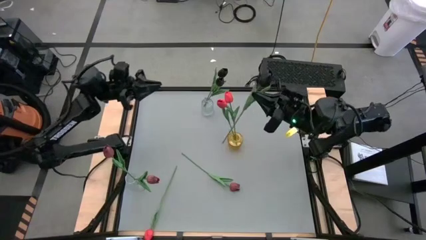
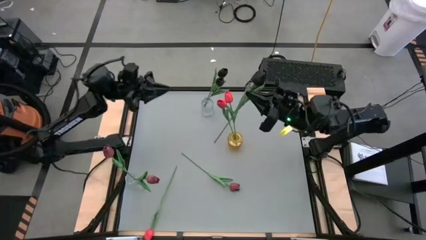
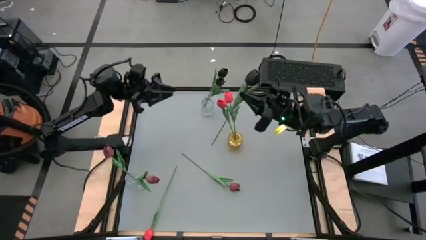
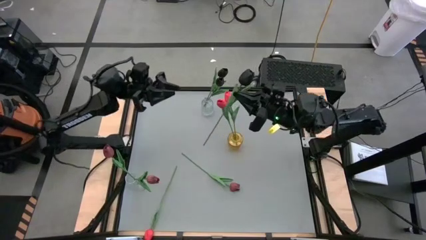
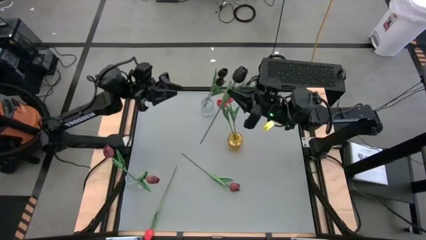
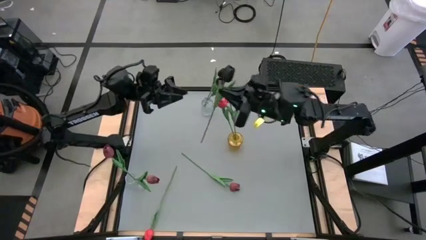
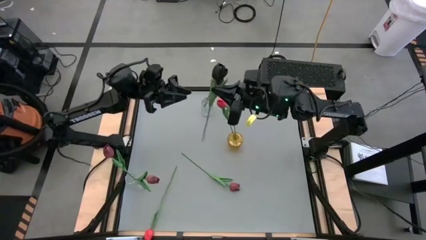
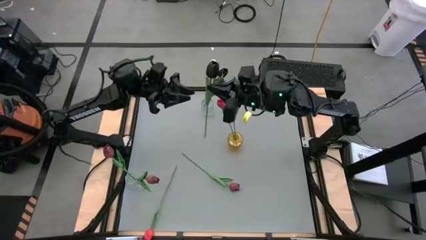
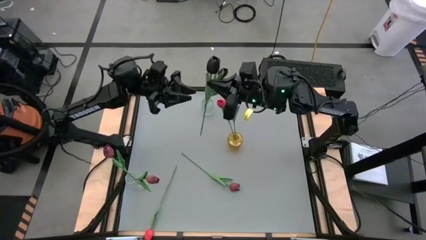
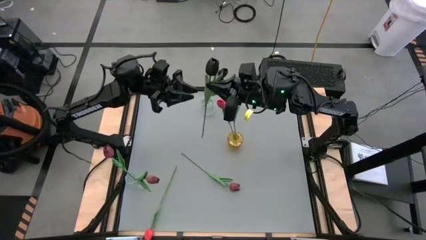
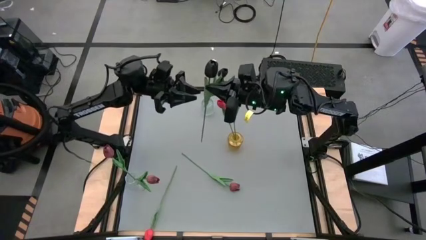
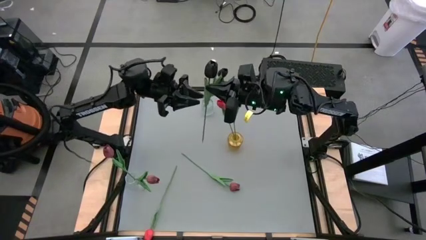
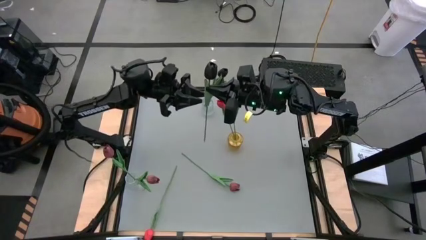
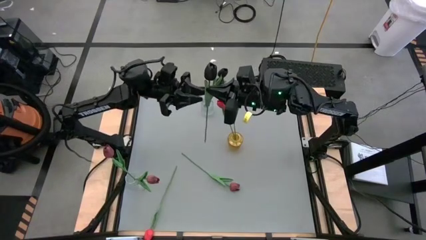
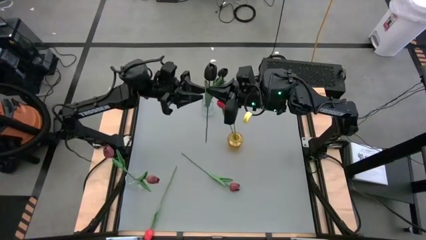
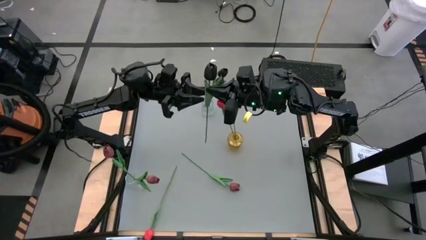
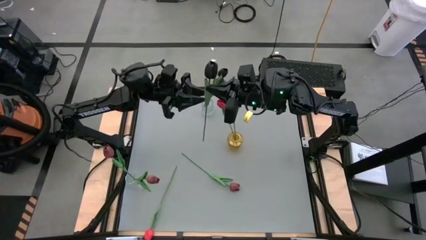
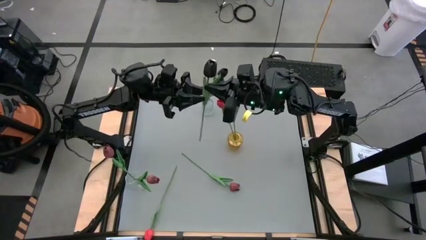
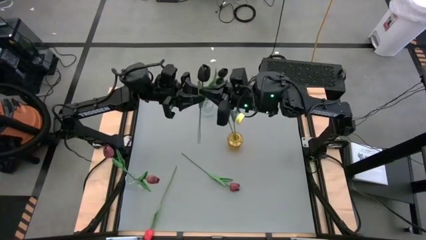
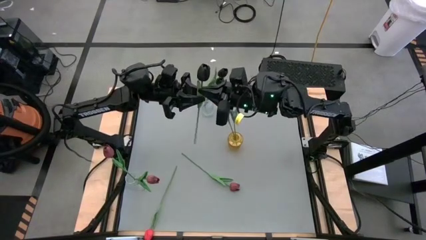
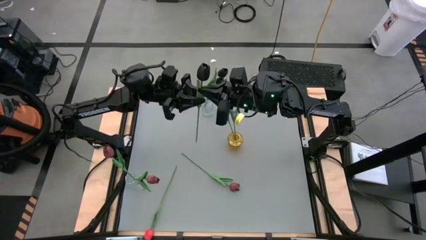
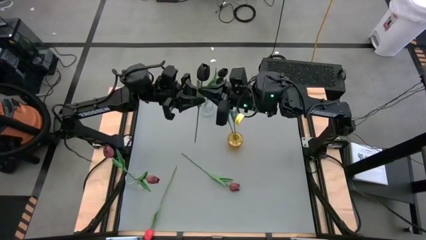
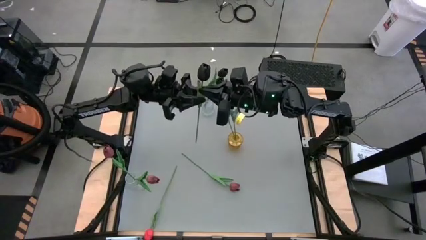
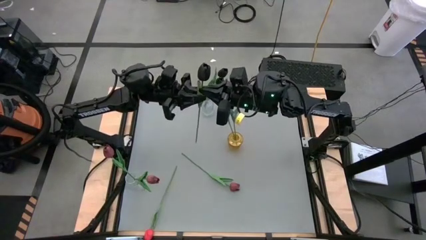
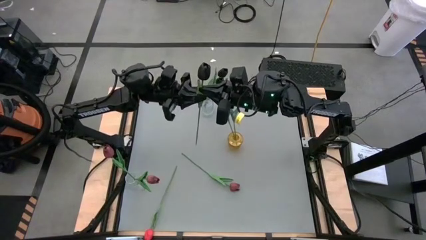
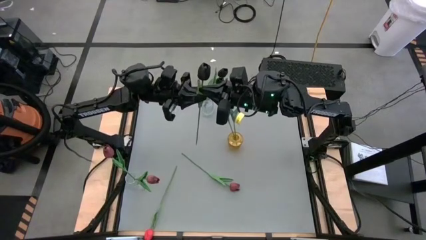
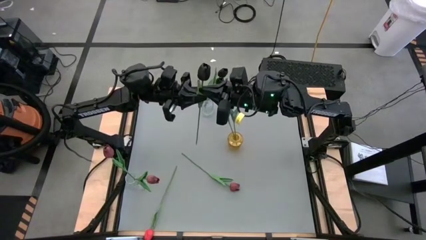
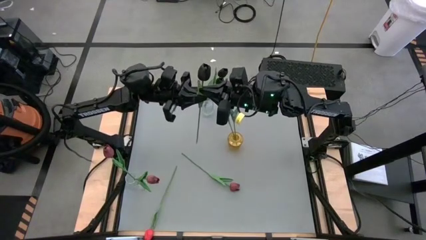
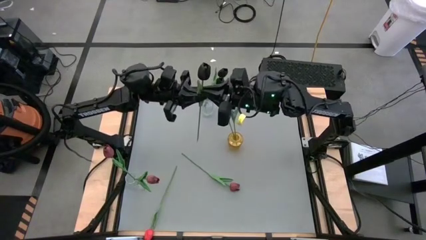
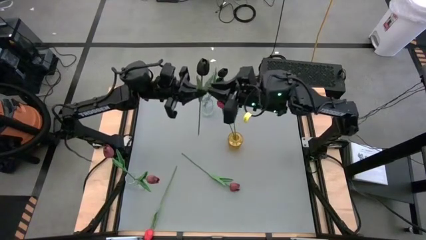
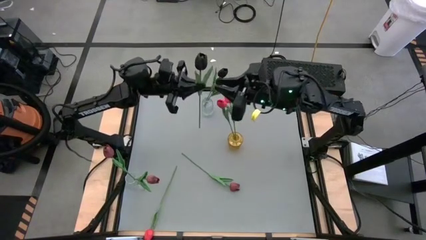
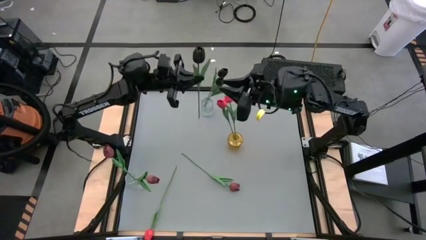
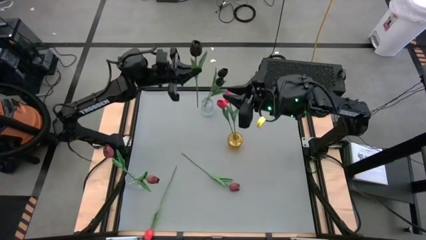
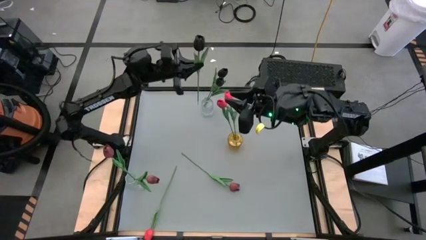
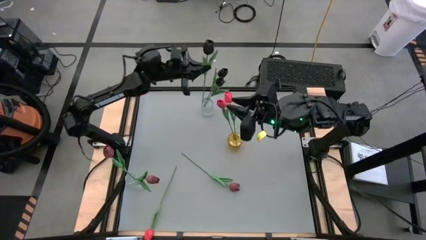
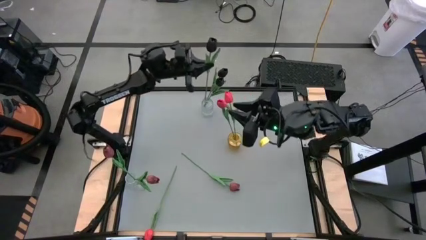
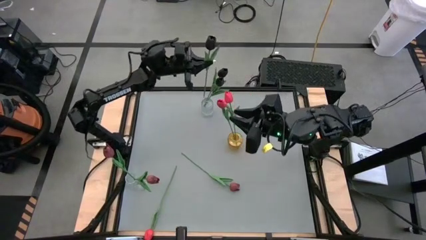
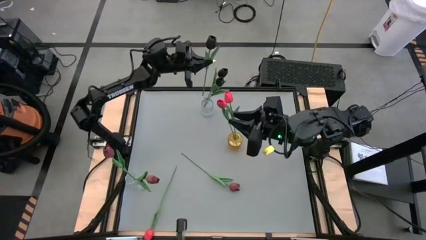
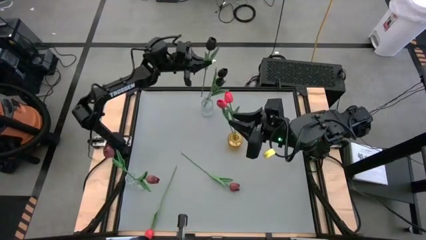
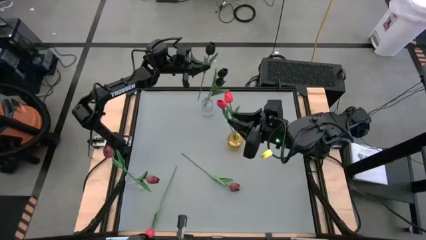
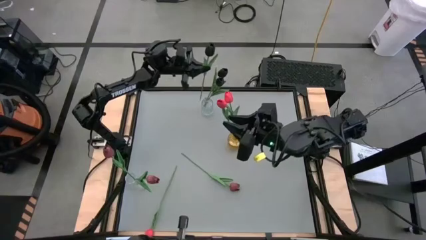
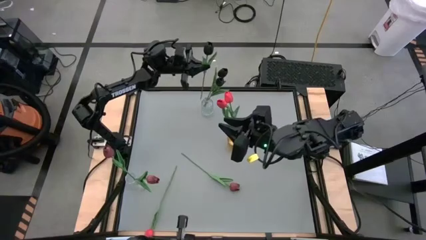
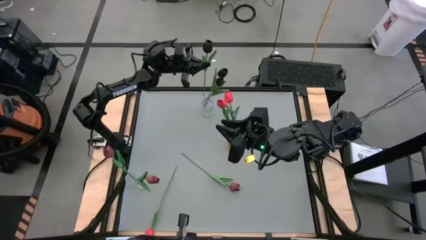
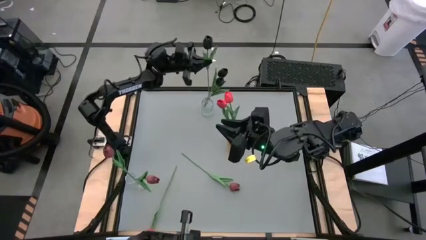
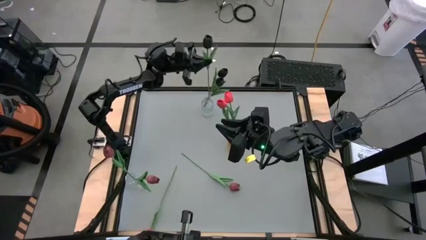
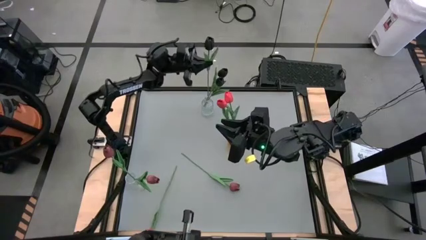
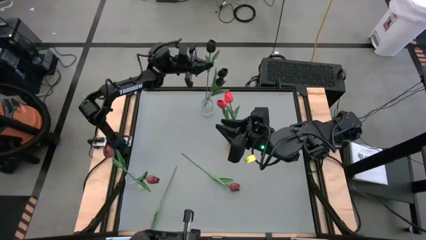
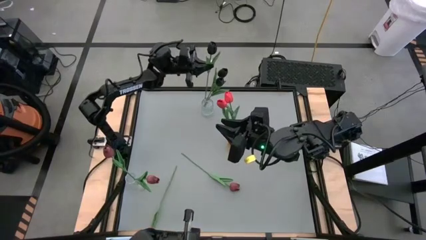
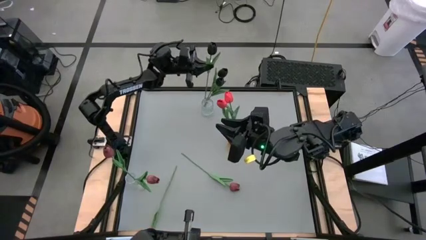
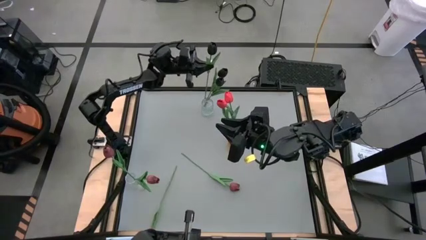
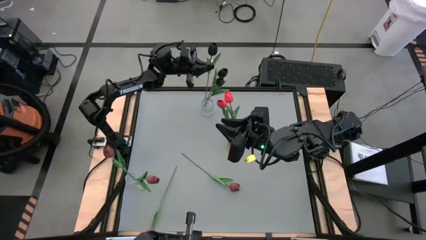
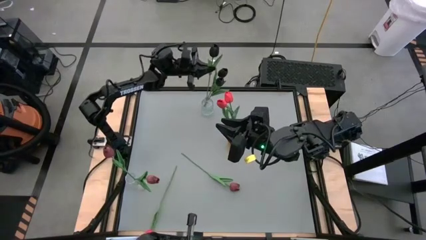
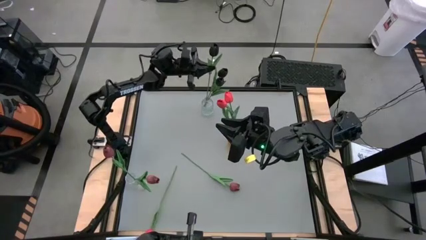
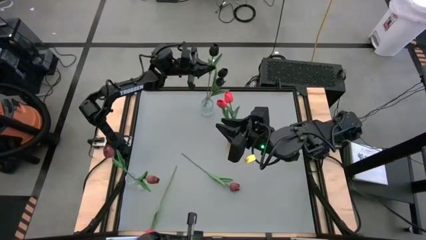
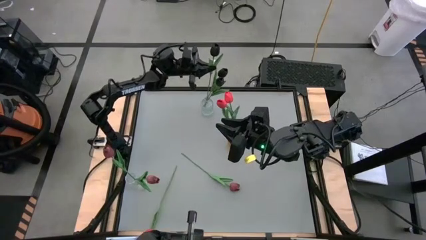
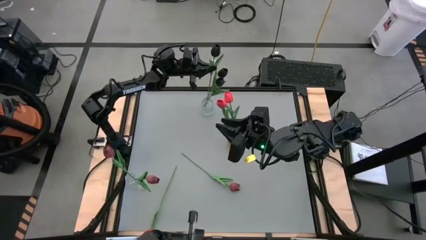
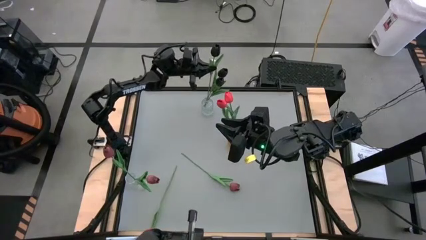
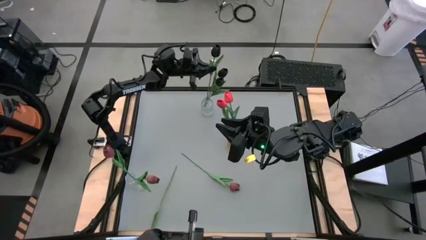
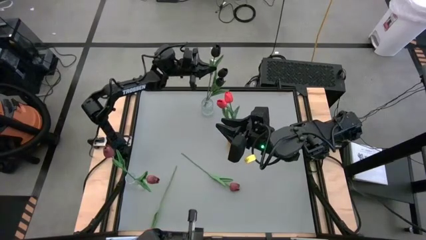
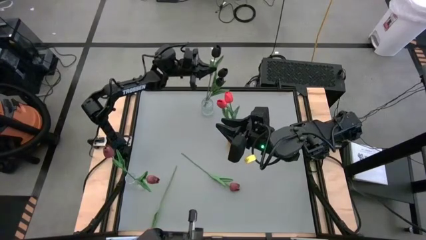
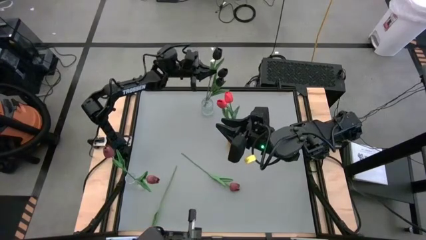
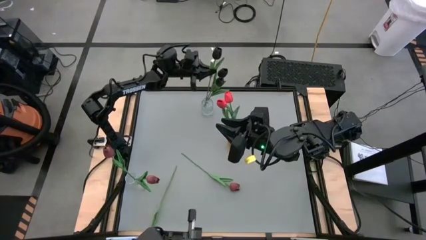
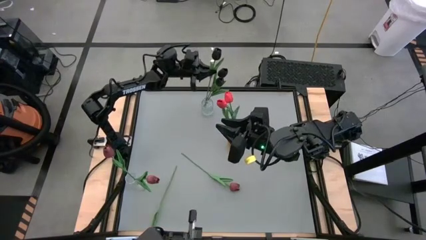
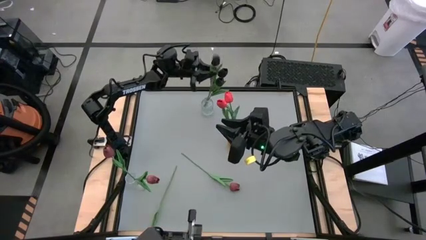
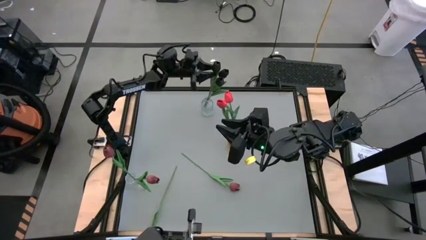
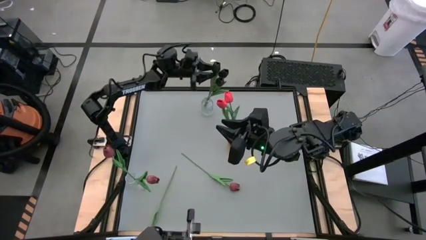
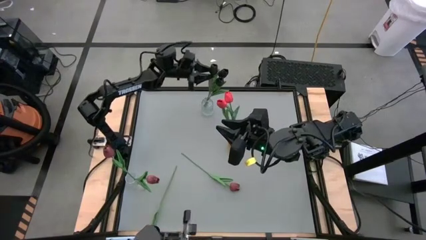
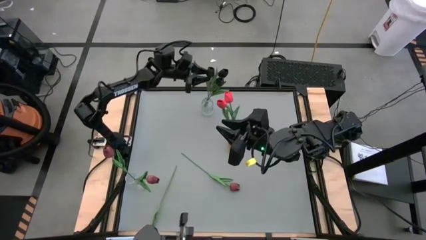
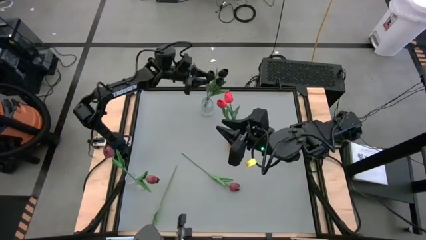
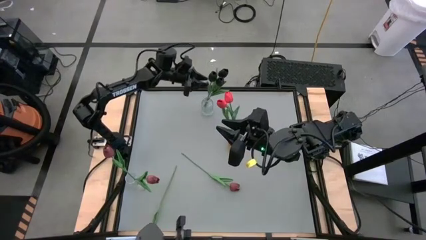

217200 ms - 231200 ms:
Task: Sort flowers into vase by color
Put the black tulip into the top transparent vase

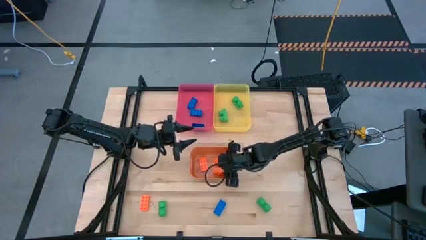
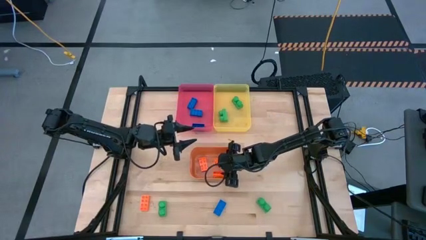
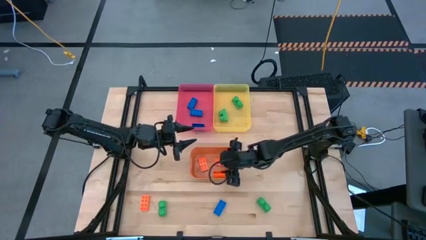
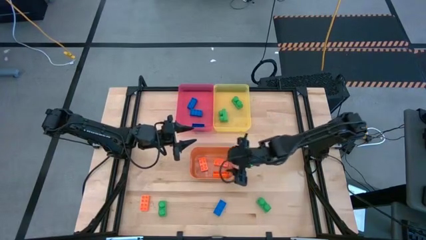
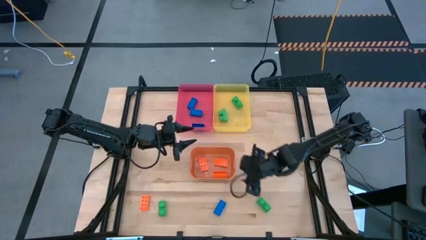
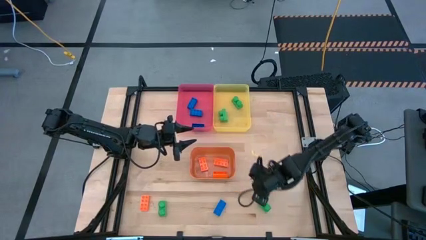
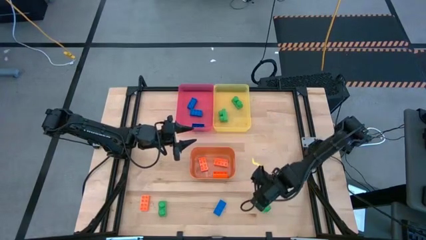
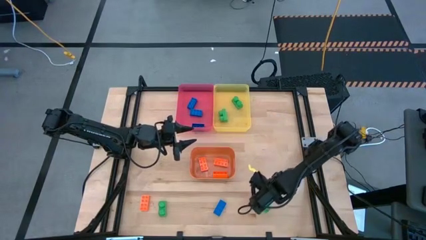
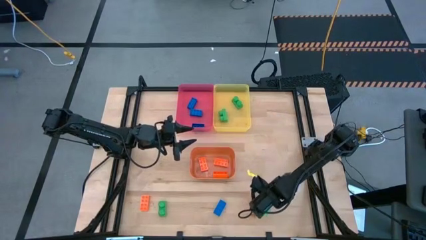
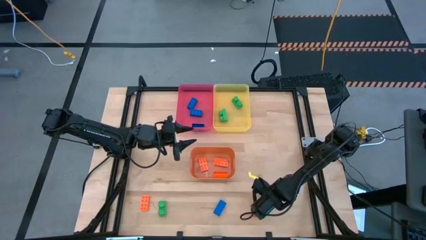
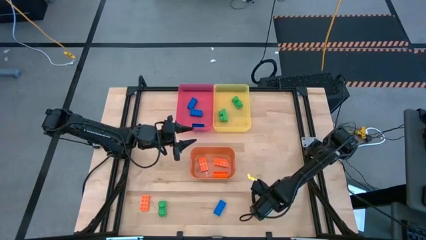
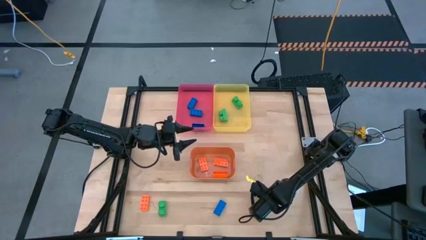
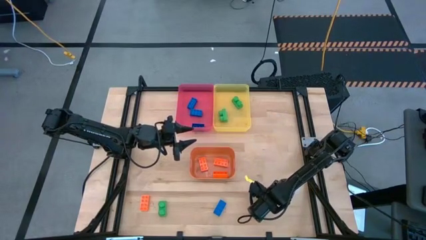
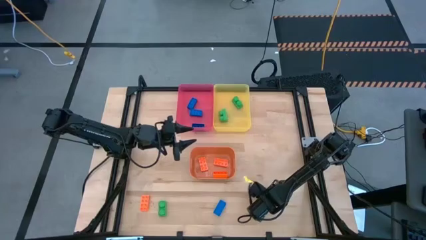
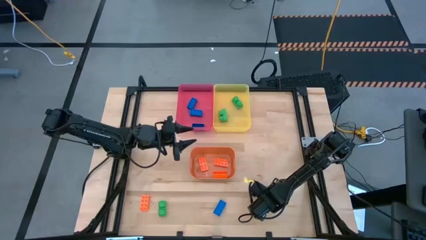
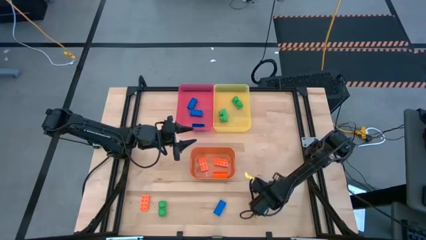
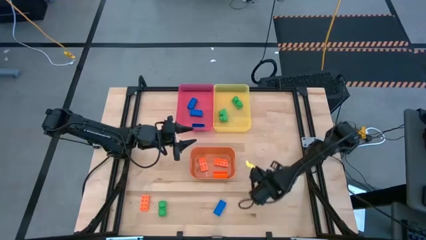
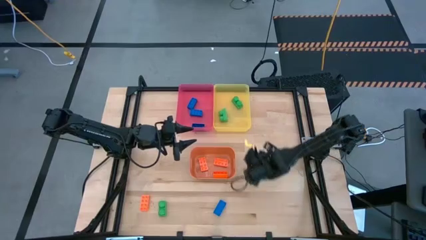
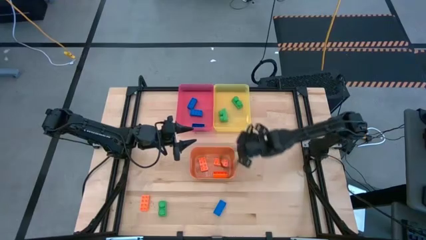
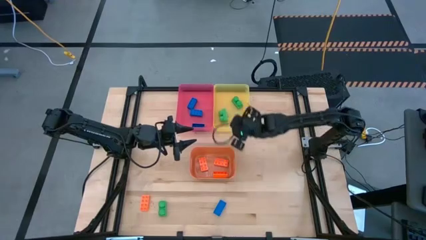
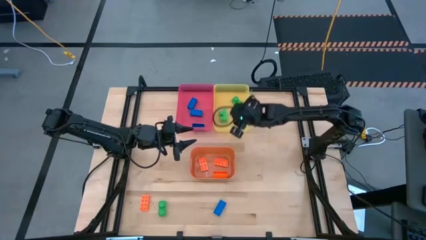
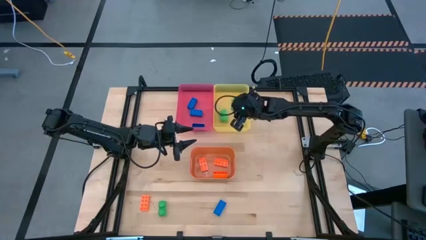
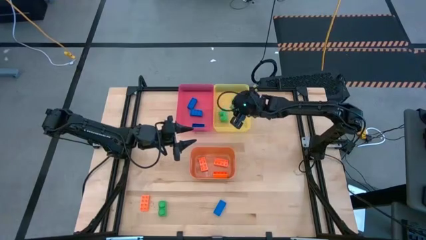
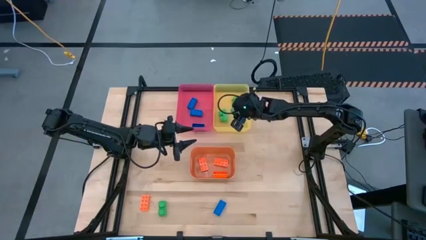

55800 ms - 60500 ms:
Task: Sort & place blocks by color
Put the green game piece into the yellow bin
